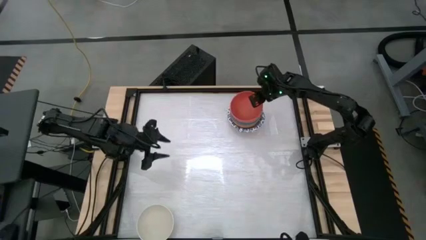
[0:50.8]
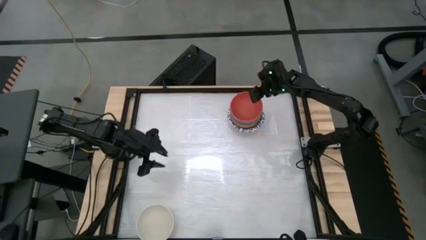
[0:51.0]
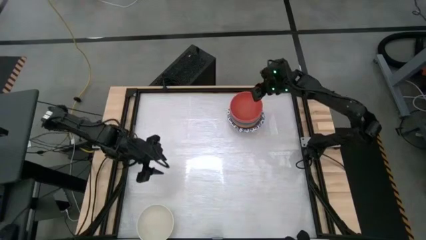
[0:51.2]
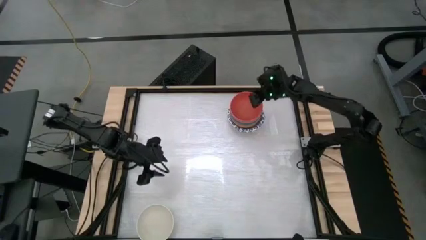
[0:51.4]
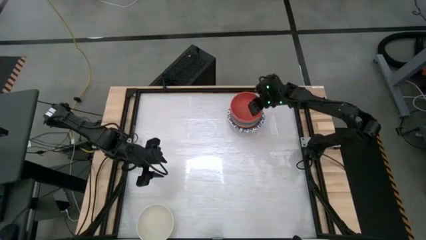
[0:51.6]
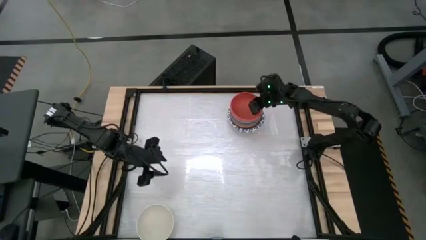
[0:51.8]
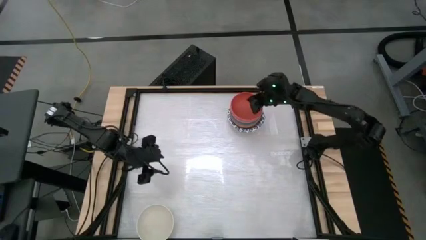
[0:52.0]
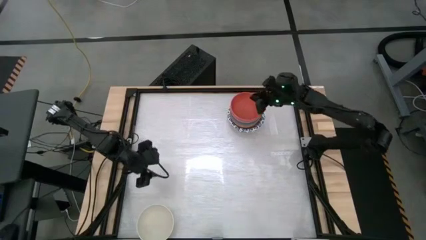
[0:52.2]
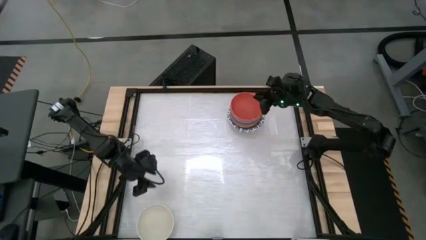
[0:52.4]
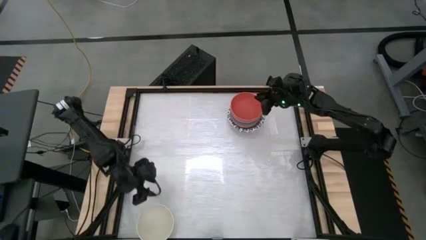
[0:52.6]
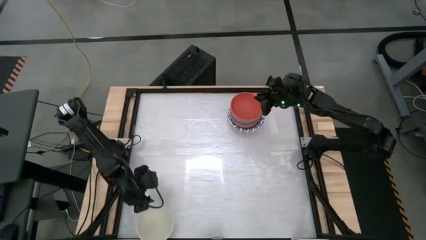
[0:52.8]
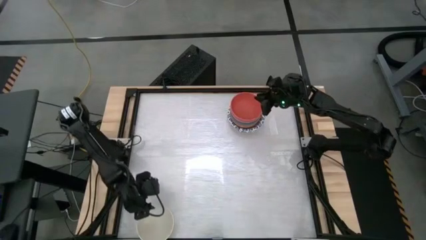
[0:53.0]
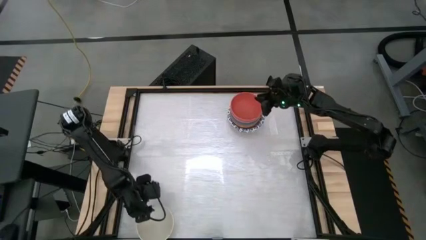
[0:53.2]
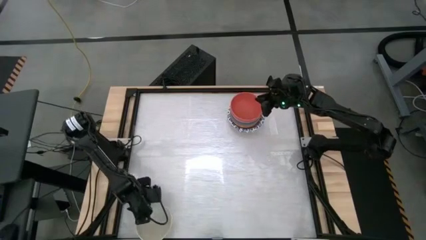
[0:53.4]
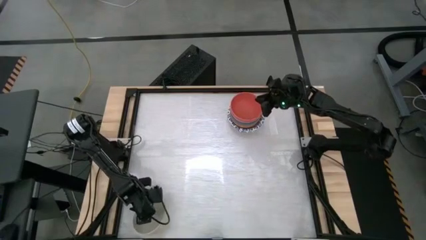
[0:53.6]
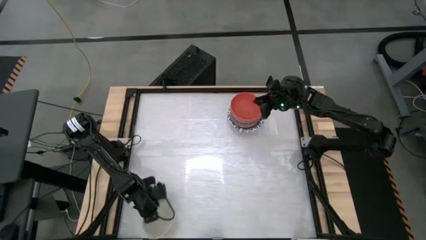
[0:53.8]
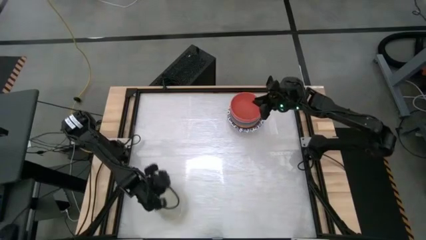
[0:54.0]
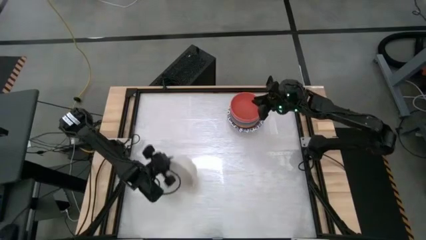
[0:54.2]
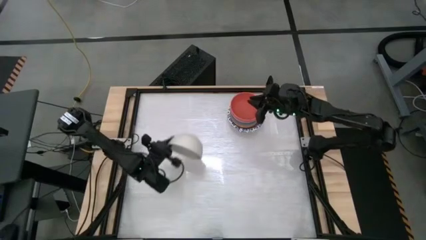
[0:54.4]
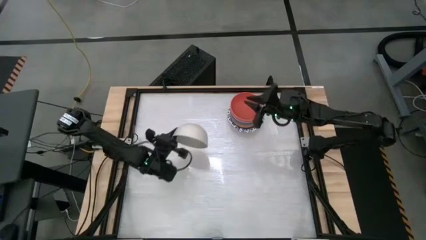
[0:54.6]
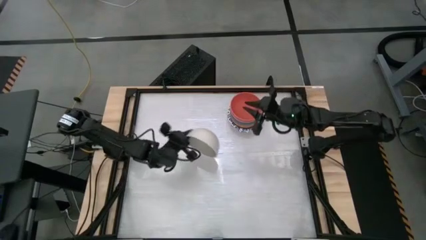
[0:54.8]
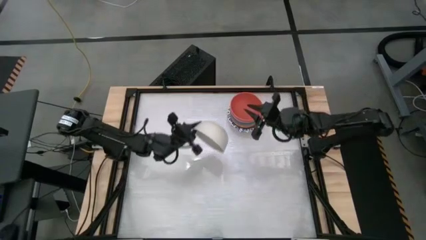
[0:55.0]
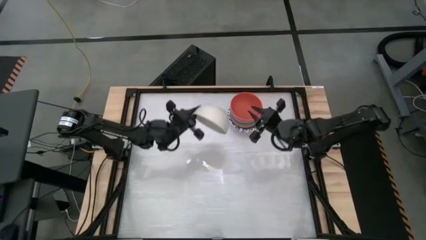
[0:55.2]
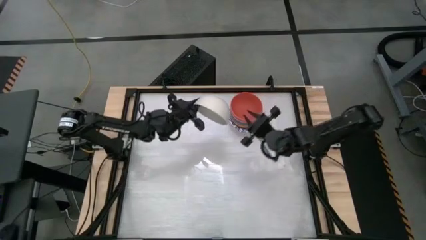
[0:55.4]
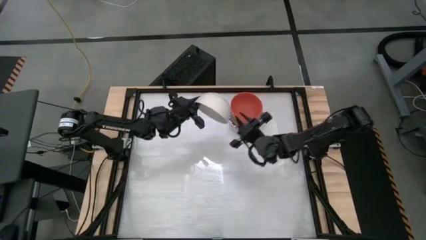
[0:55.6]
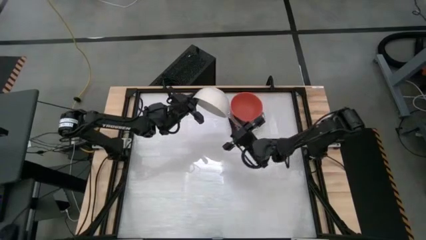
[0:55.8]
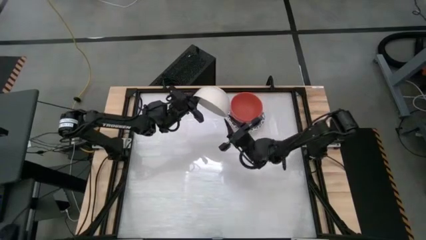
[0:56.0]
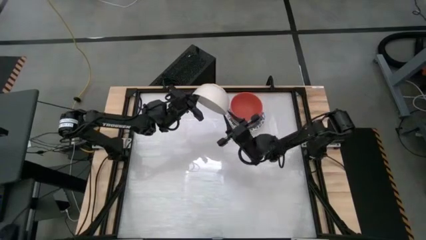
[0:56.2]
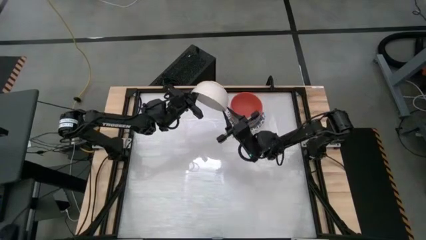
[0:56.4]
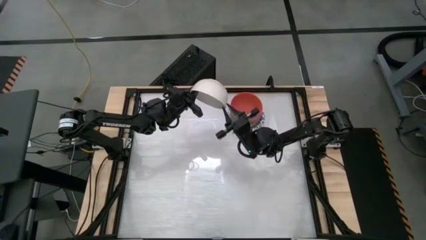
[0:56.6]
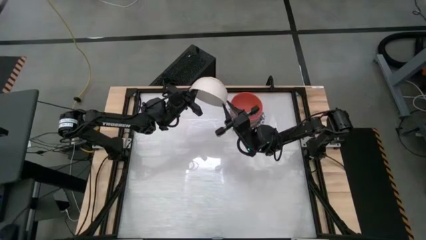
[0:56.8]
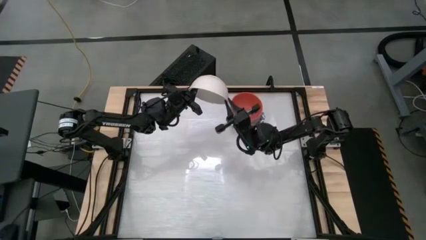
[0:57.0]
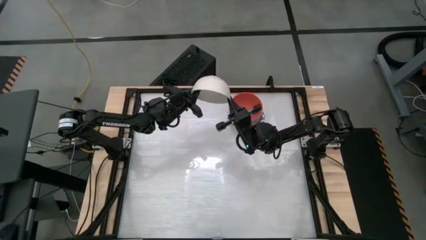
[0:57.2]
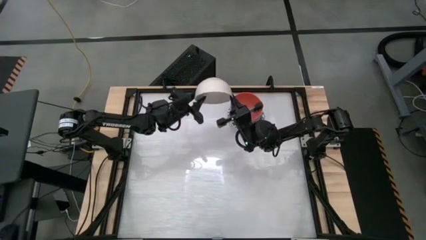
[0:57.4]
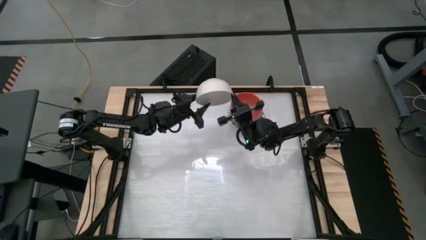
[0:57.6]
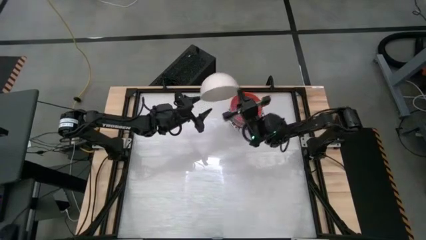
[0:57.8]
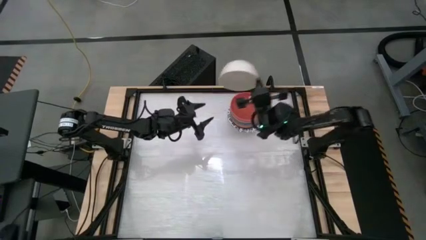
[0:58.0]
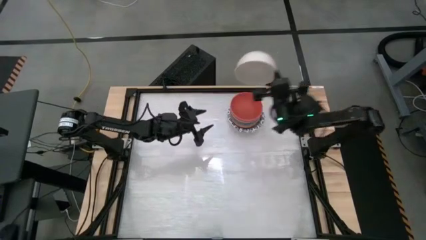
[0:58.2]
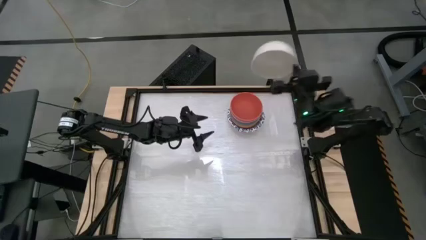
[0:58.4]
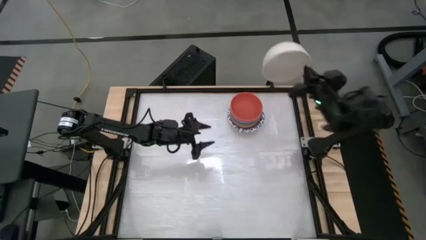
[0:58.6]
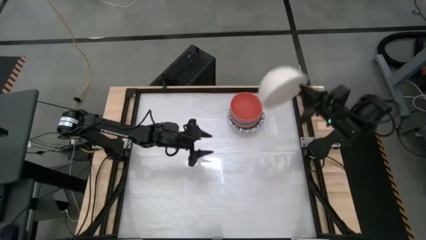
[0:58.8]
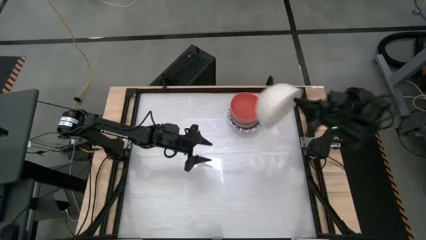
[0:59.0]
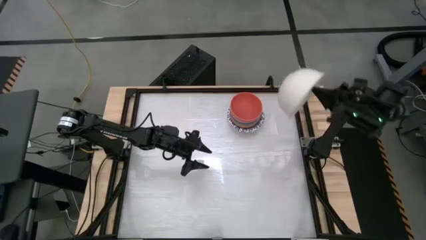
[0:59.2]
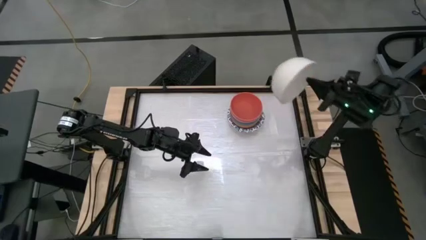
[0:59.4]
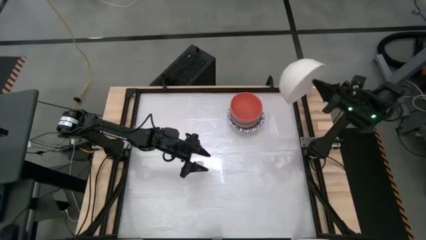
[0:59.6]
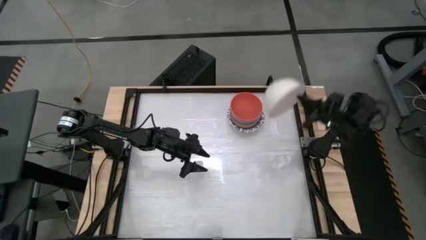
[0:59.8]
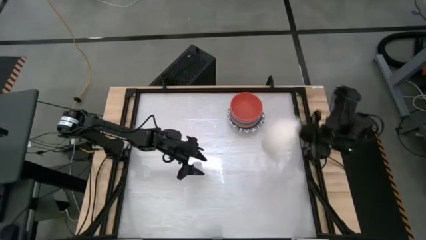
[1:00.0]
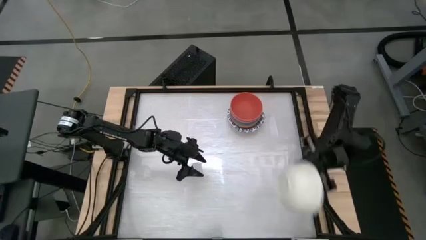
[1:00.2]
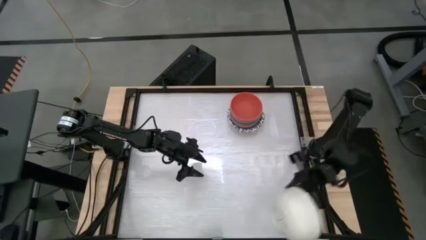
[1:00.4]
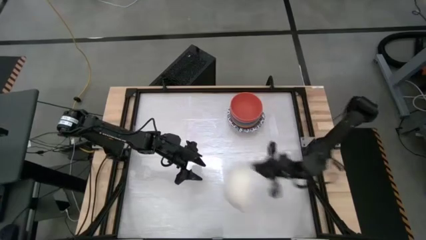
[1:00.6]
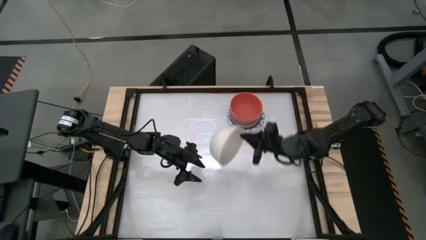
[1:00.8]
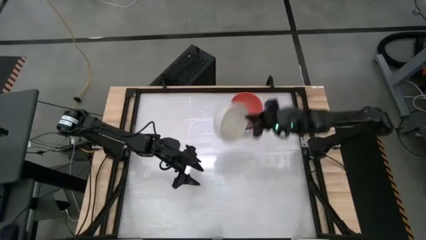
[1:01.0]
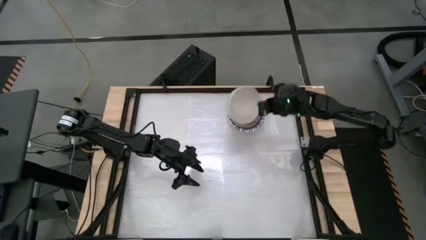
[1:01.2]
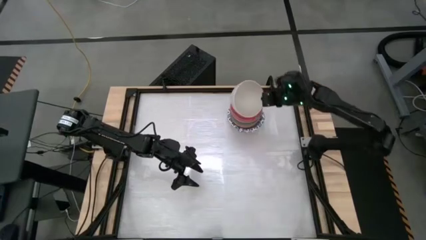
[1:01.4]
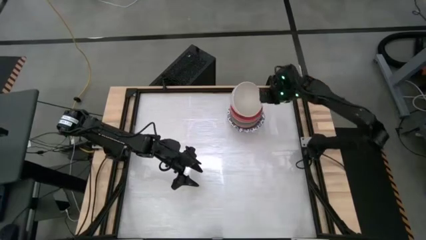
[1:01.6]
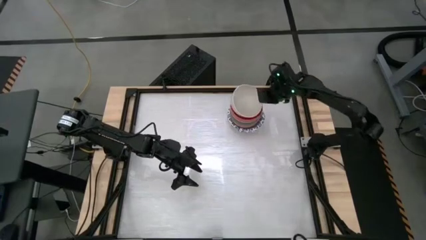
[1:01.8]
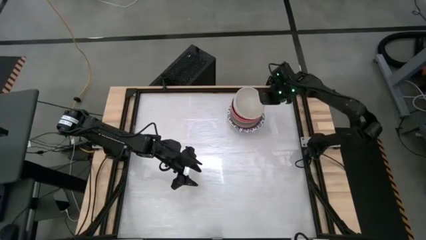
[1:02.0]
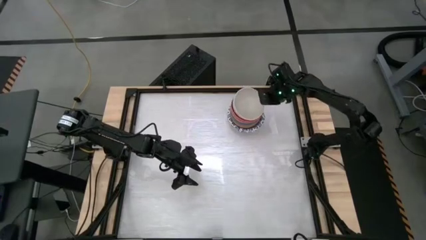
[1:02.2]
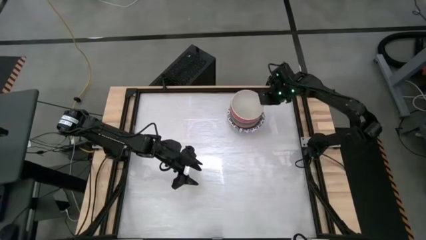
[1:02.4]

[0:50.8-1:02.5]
Stack the white bowl into the orange bowl
